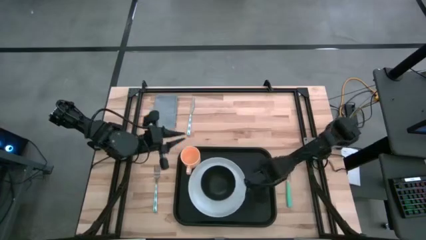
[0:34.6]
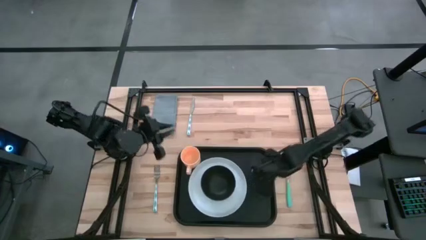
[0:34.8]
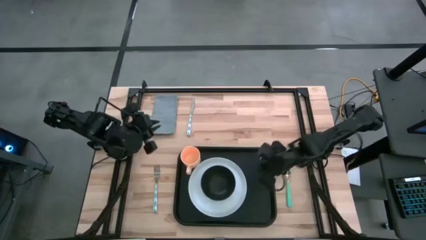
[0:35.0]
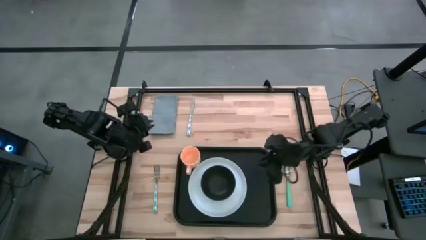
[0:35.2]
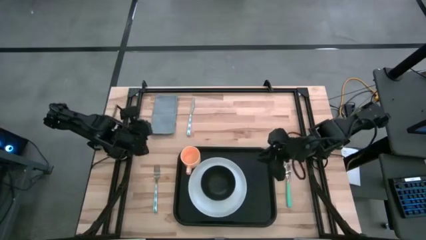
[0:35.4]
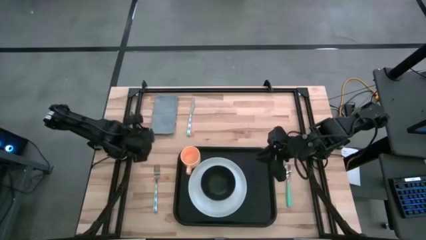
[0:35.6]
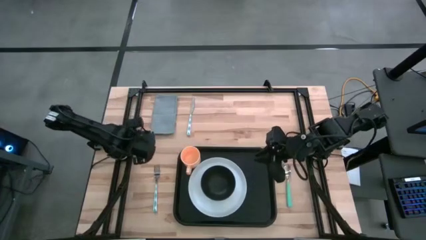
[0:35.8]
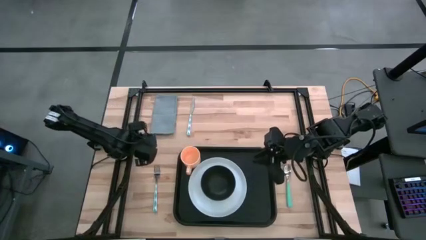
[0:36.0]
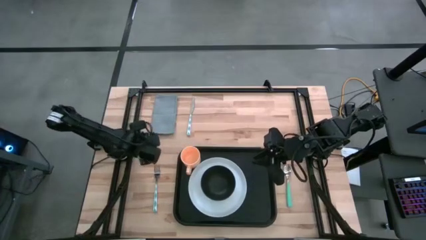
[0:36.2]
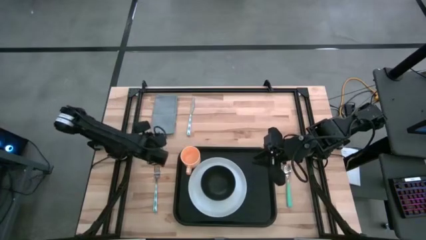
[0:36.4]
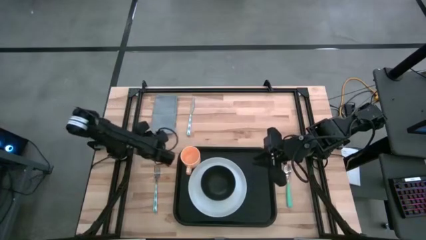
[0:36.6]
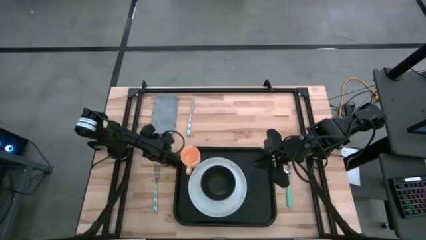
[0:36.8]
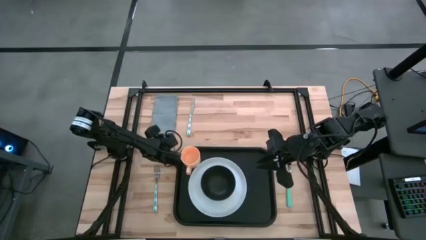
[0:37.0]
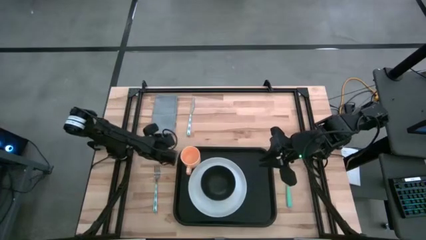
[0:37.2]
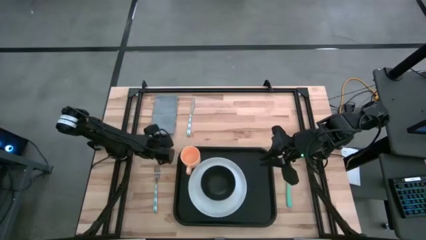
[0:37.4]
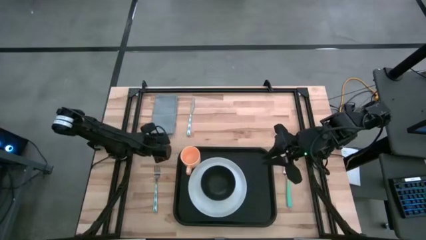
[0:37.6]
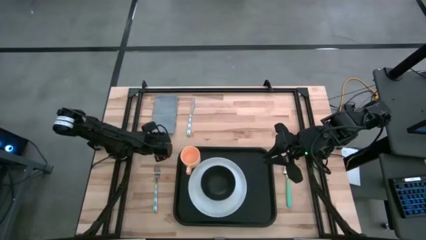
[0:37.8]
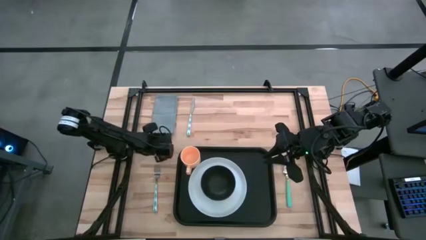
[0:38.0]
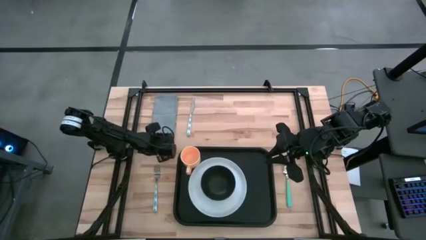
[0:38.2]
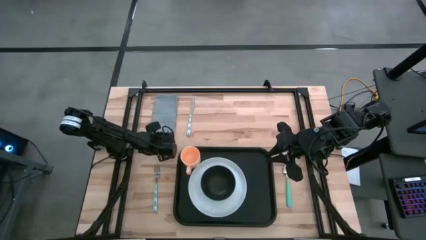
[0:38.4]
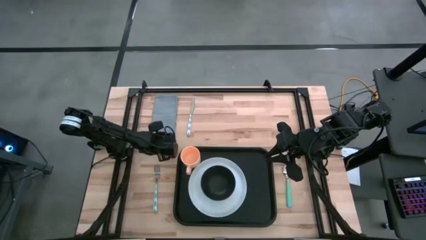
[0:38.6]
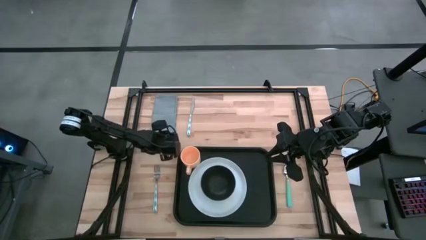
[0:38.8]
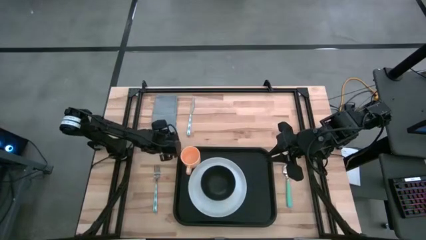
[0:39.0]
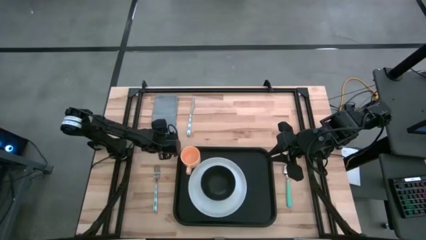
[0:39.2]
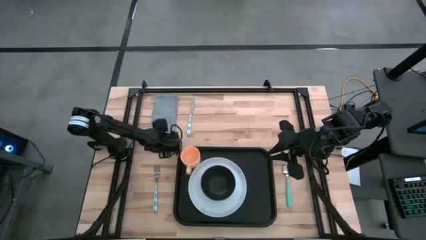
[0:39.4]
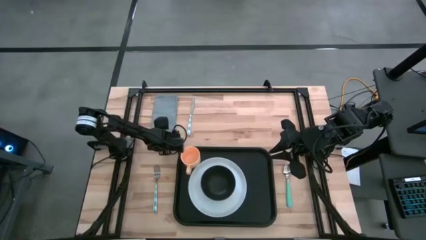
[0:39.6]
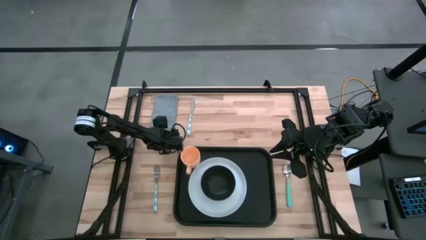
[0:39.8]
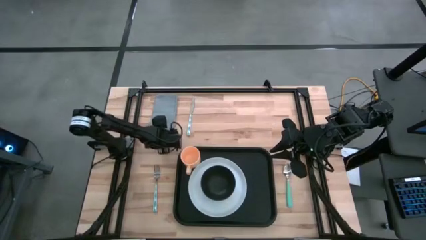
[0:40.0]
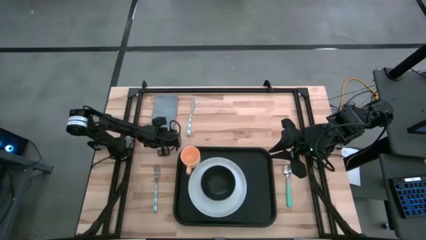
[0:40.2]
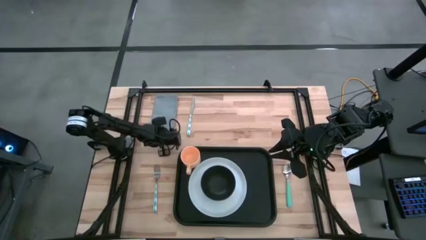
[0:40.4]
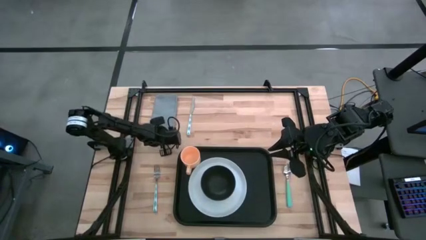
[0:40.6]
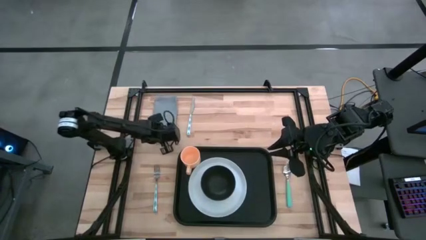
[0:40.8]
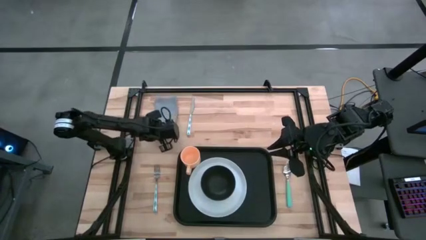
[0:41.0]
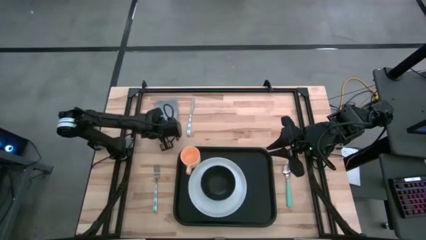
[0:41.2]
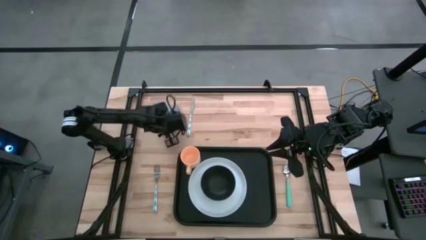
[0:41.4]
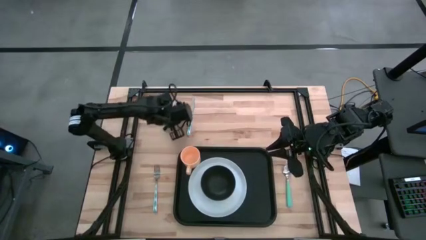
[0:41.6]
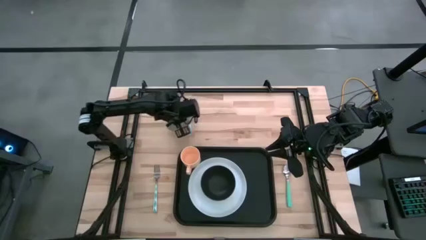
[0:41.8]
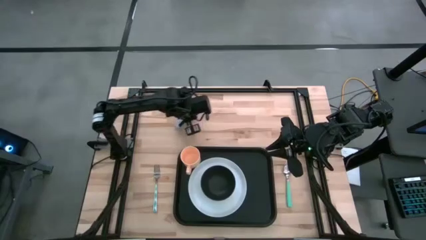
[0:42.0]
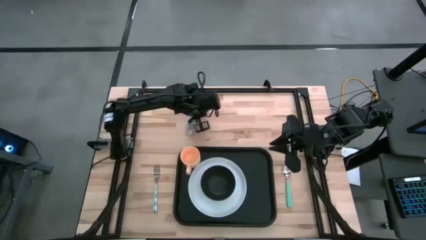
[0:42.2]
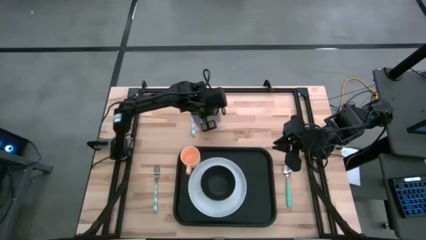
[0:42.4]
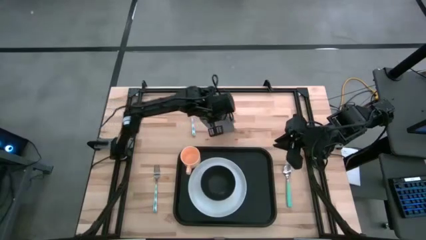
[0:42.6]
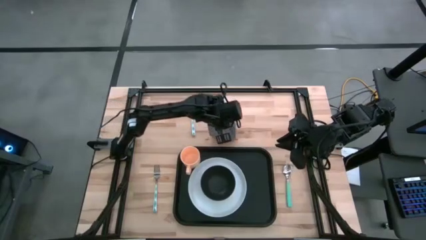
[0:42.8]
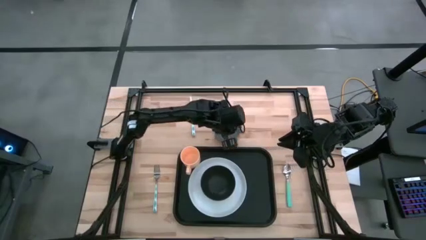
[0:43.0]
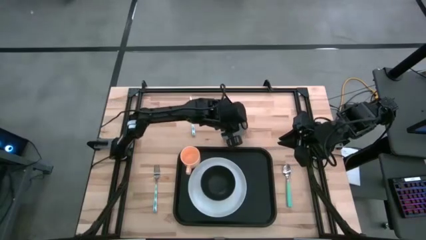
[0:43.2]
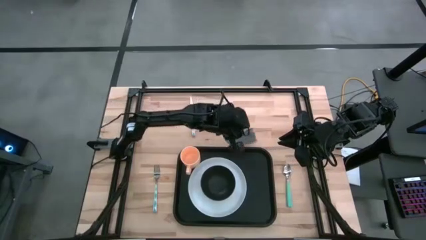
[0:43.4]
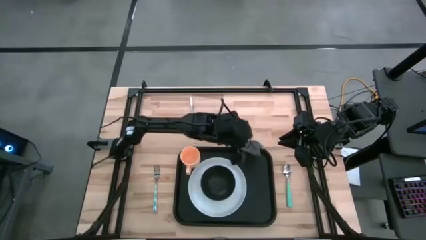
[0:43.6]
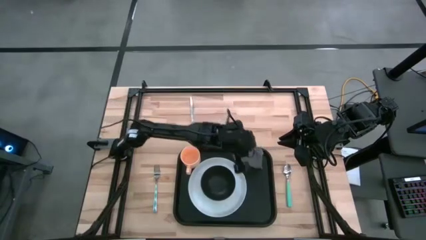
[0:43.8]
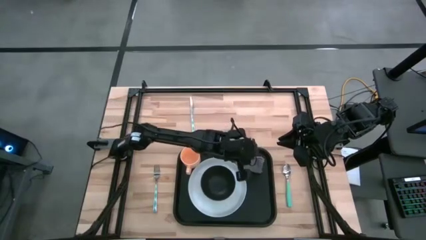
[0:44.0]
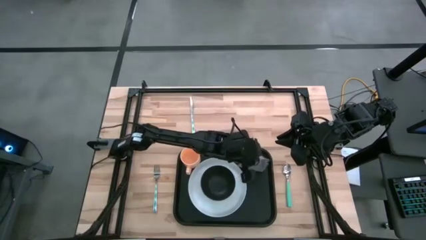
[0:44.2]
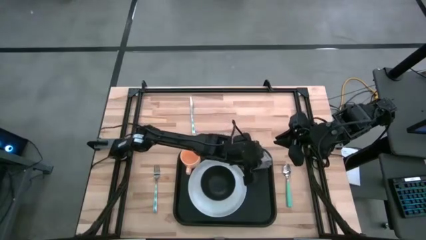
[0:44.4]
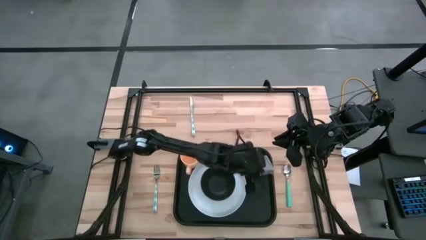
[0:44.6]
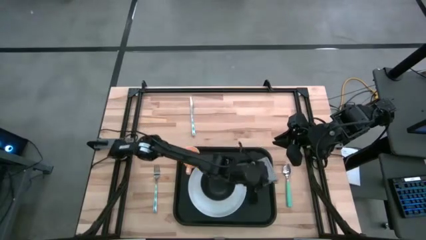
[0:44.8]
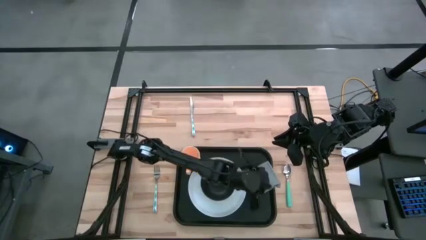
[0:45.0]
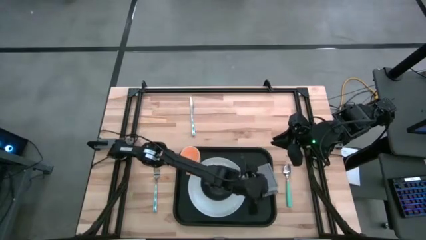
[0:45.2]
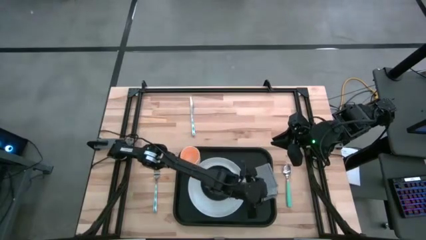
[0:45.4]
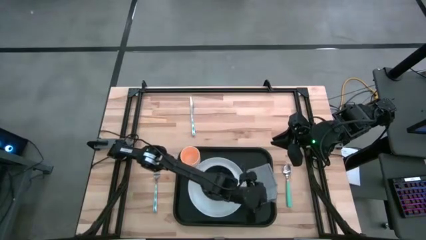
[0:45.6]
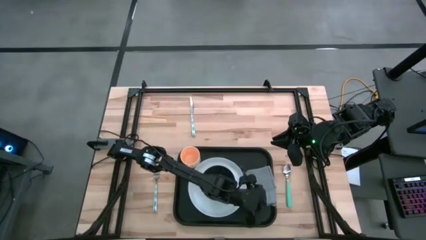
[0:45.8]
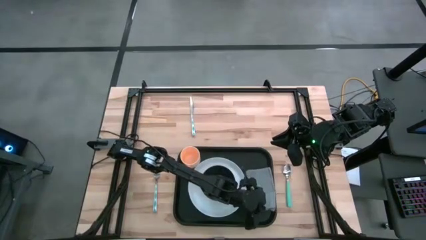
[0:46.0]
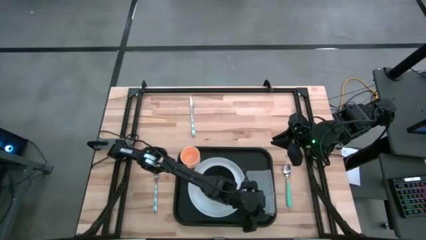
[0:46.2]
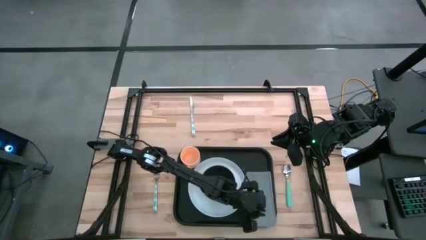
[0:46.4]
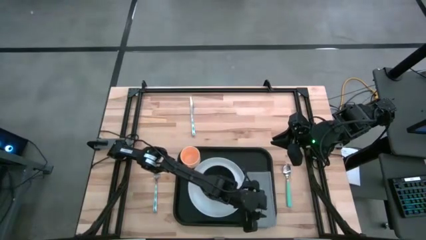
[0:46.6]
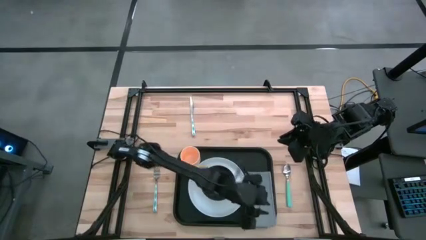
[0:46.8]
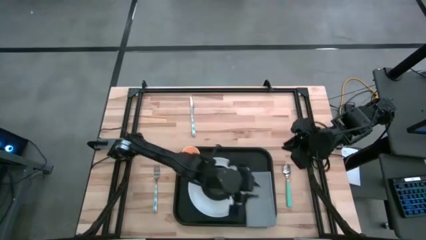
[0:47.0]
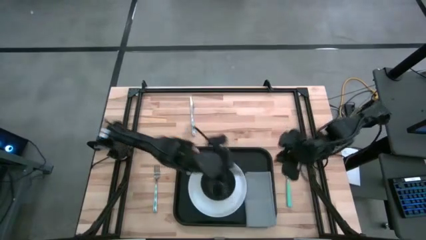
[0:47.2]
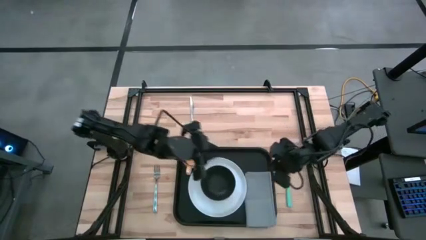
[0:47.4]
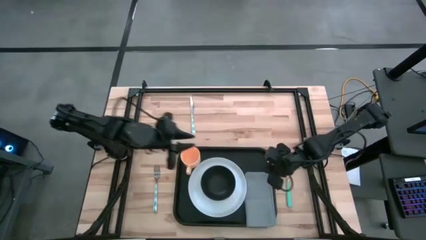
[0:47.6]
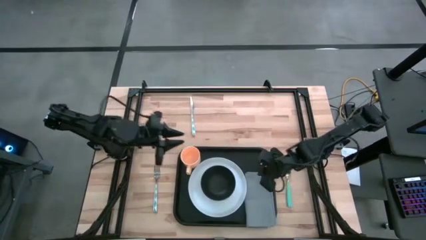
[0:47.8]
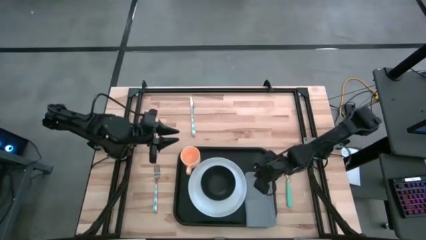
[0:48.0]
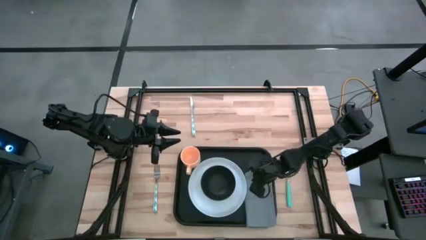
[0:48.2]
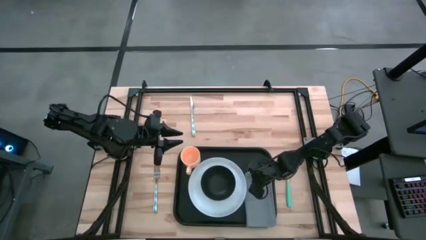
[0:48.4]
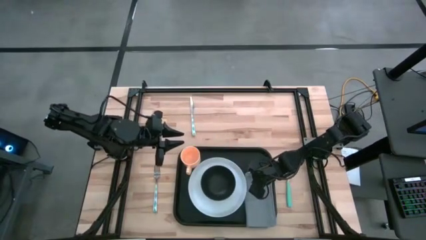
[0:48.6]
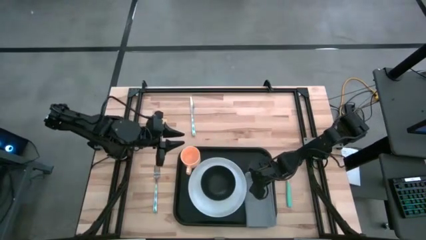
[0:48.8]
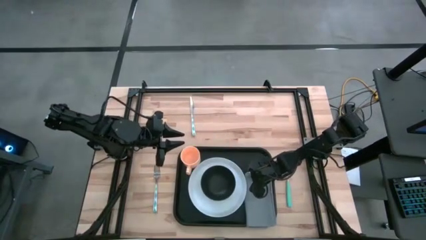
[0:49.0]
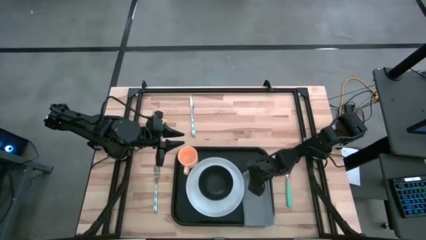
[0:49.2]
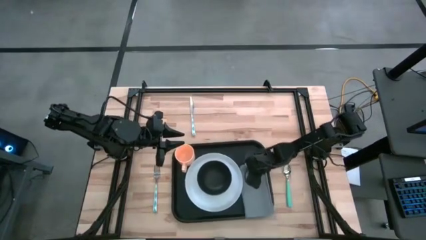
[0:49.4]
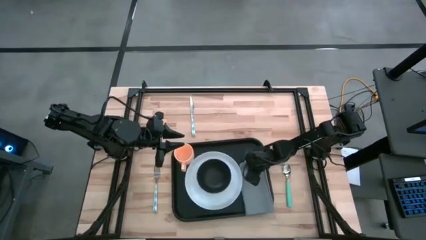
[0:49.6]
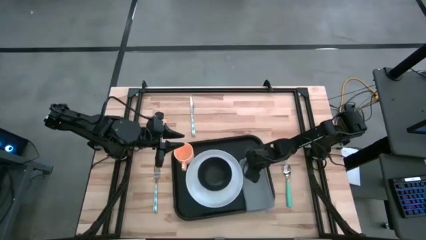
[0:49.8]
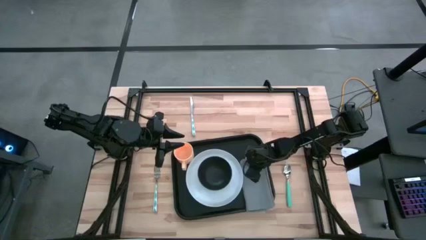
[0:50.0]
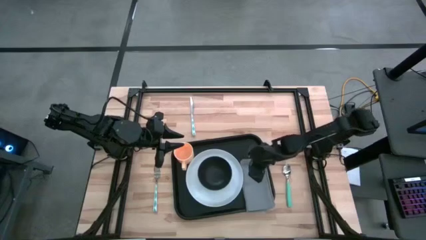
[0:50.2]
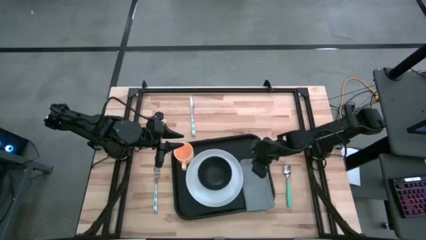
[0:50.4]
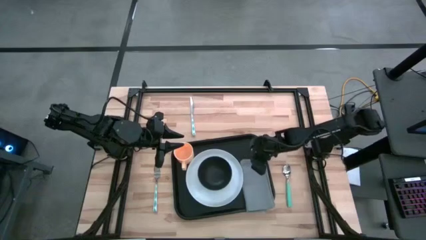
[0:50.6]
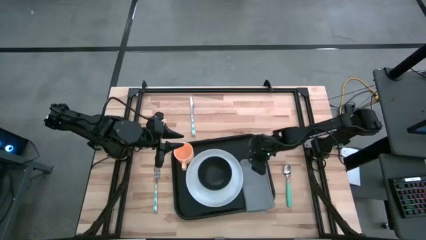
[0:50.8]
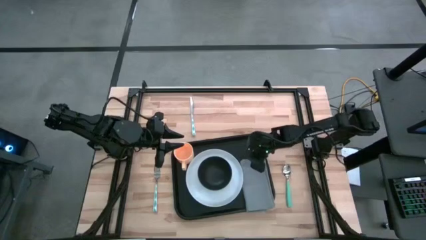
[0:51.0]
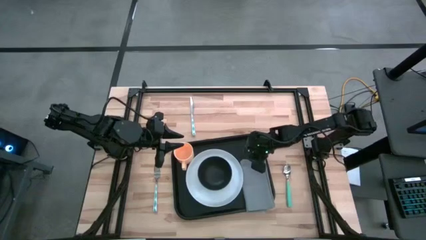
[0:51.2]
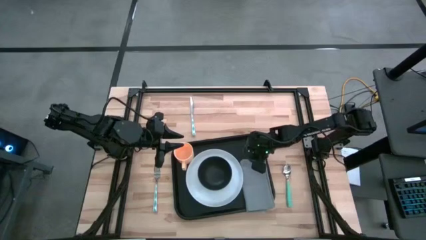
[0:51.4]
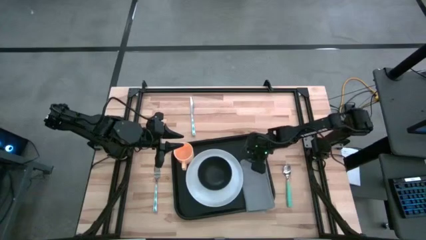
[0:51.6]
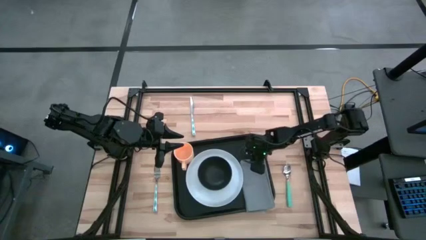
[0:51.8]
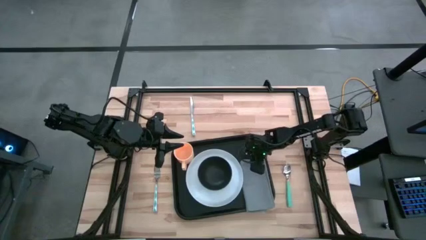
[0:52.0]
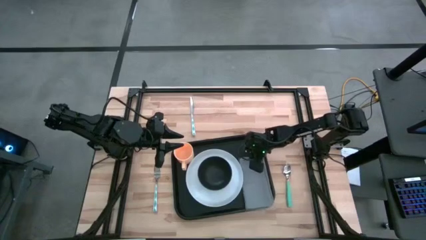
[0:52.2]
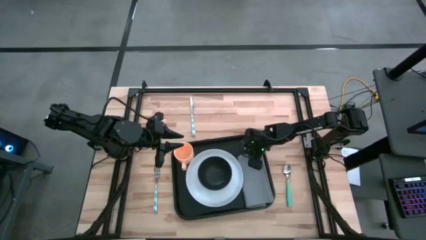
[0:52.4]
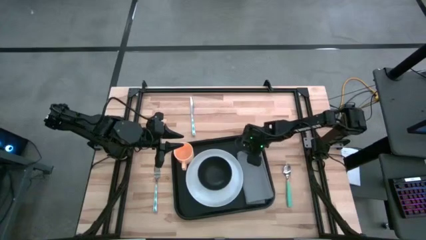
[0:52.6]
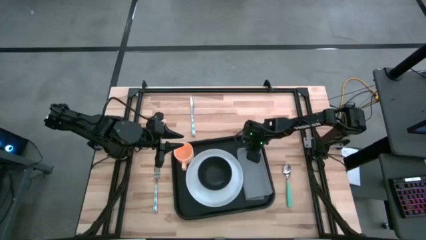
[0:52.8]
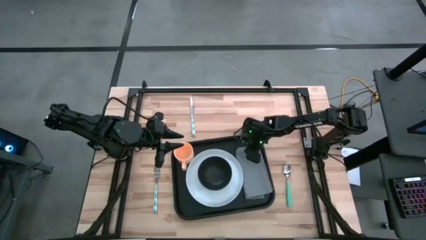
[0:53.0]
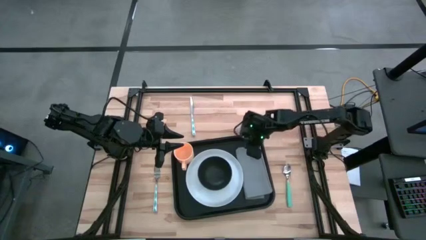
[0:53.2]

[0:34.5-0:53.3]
Task: Set up tray
Put the gray napkin on the black serving tray to the right side of the white plate
